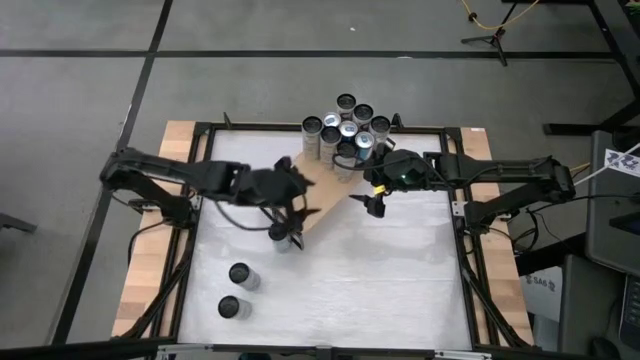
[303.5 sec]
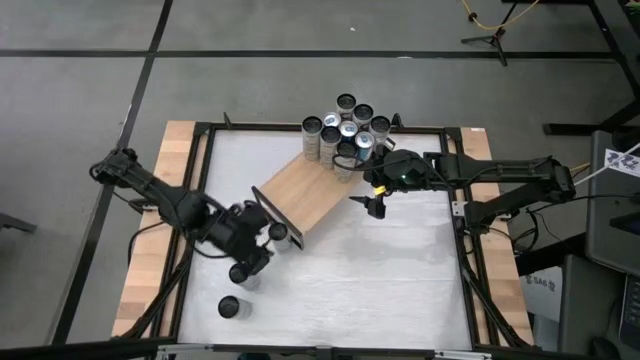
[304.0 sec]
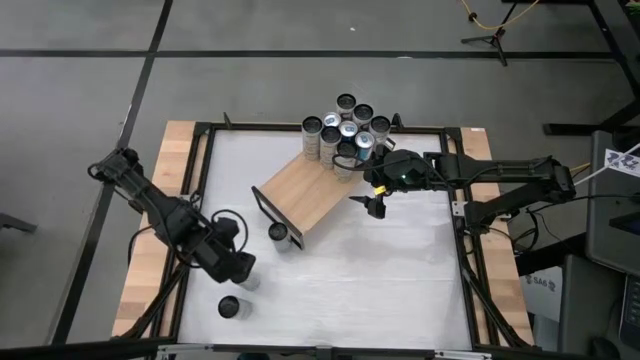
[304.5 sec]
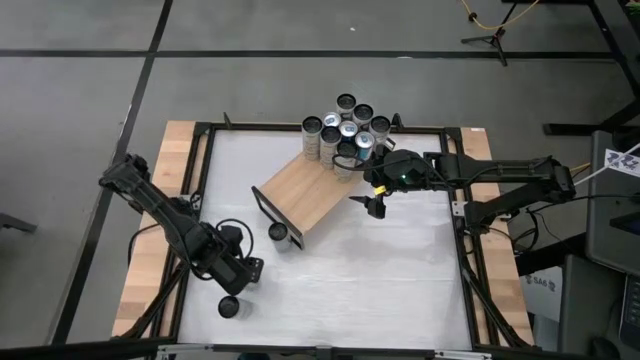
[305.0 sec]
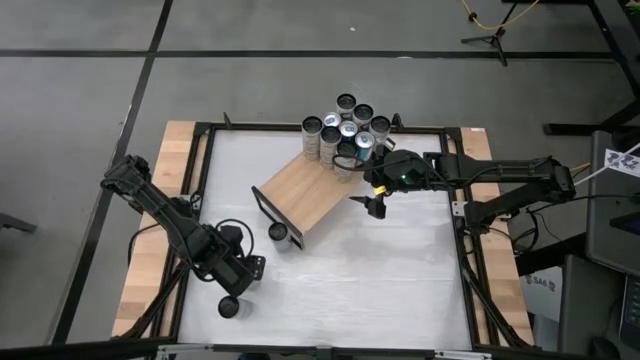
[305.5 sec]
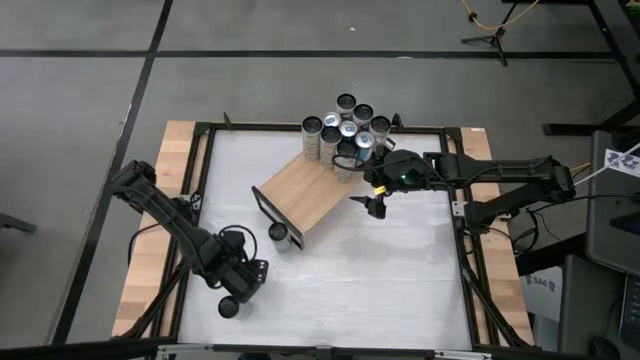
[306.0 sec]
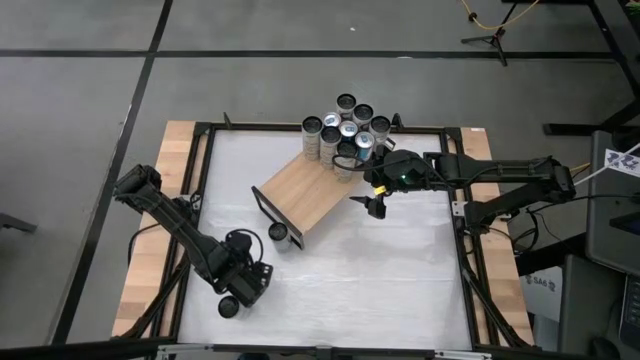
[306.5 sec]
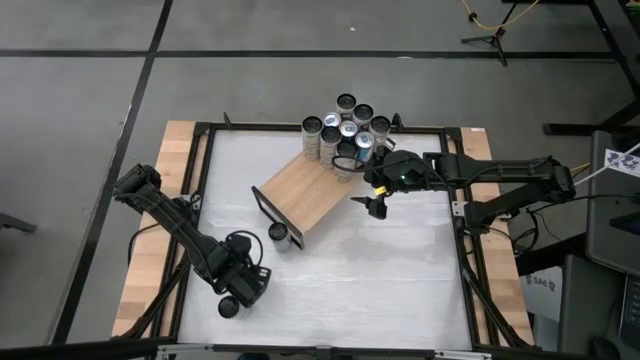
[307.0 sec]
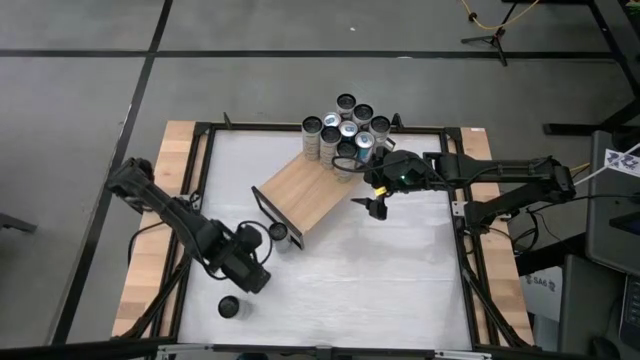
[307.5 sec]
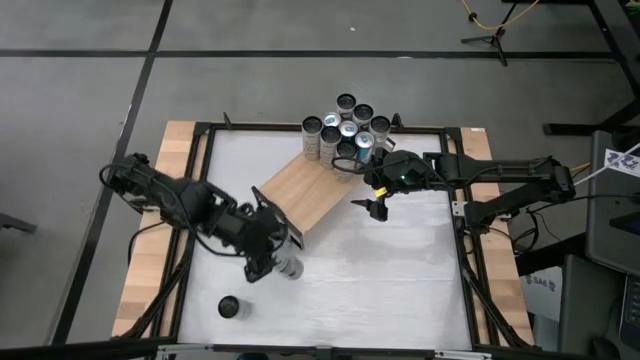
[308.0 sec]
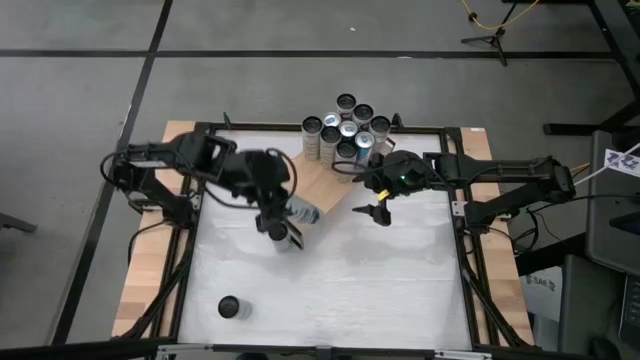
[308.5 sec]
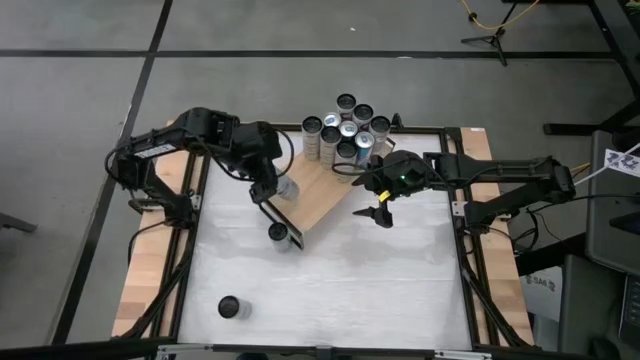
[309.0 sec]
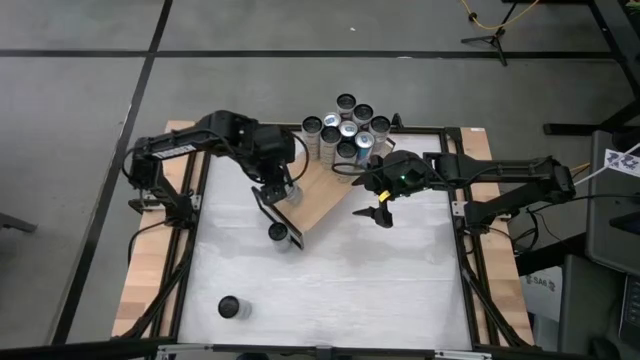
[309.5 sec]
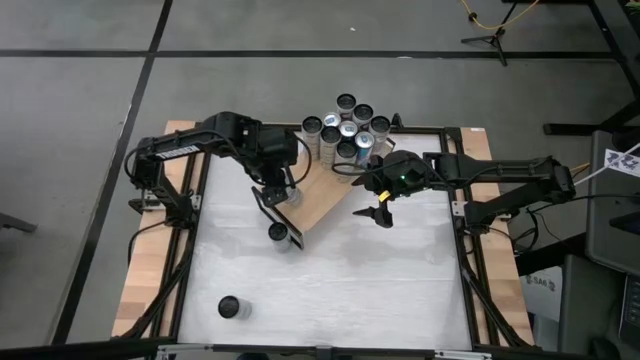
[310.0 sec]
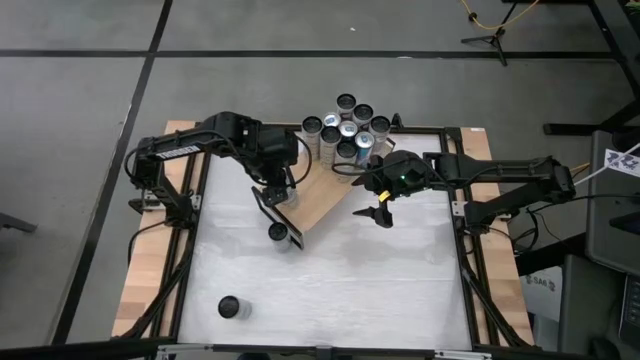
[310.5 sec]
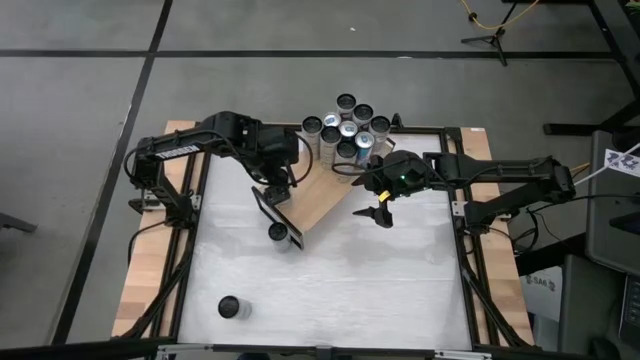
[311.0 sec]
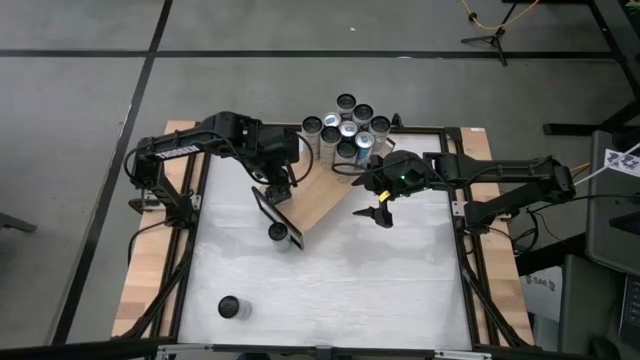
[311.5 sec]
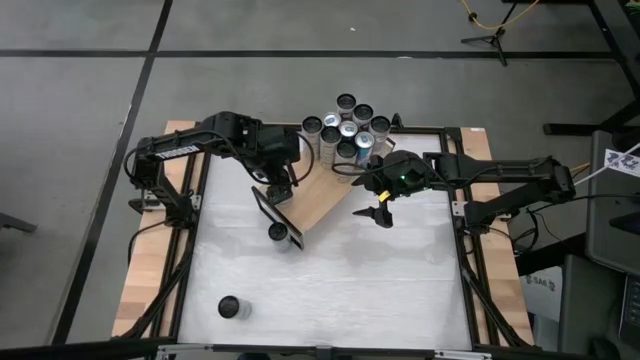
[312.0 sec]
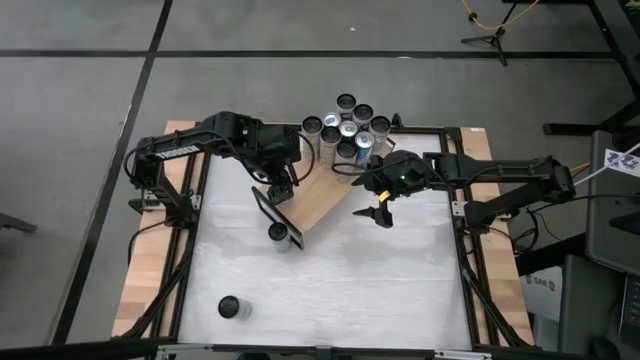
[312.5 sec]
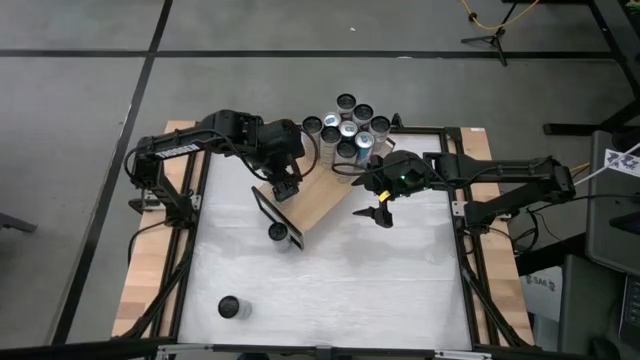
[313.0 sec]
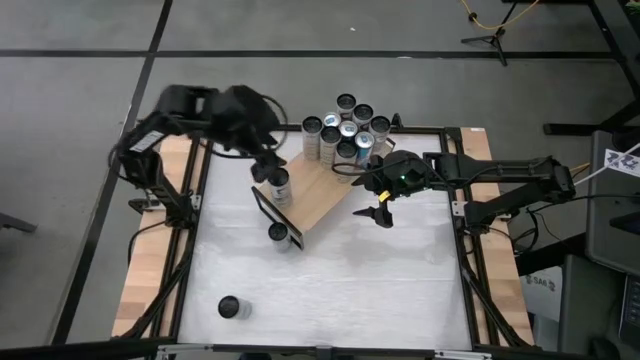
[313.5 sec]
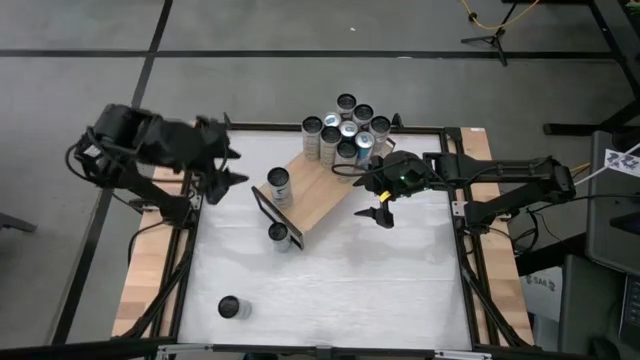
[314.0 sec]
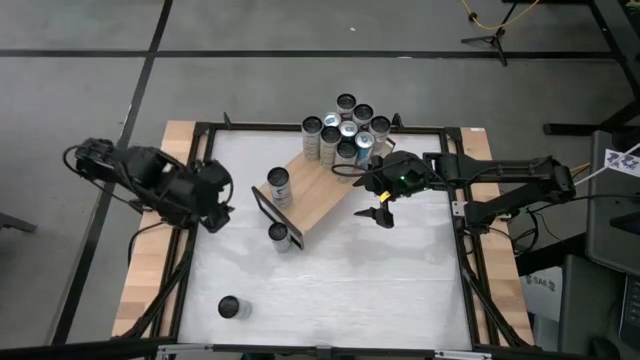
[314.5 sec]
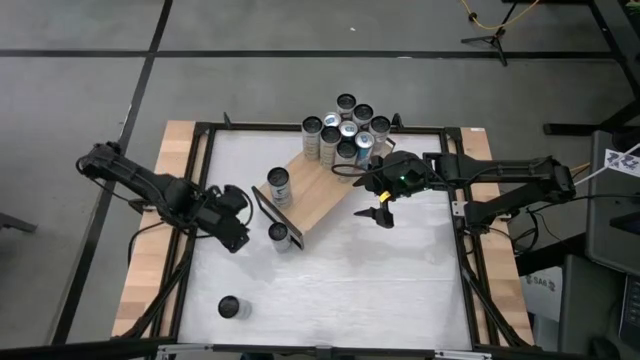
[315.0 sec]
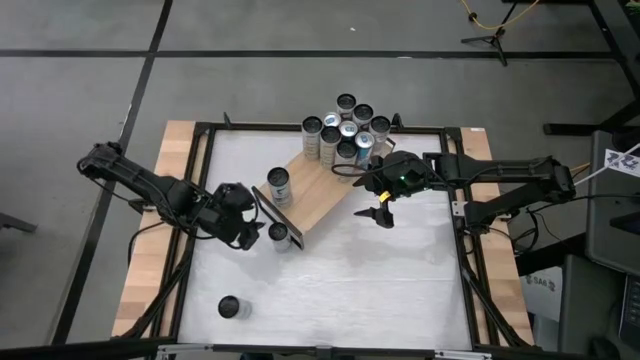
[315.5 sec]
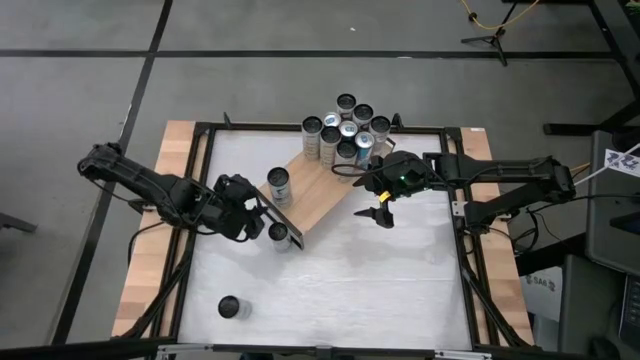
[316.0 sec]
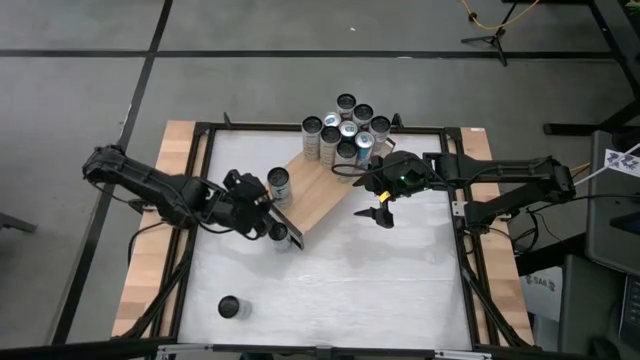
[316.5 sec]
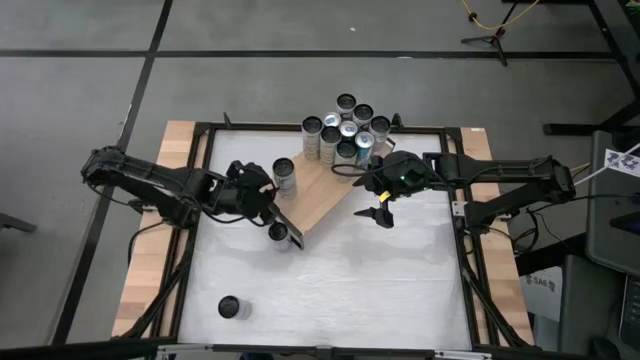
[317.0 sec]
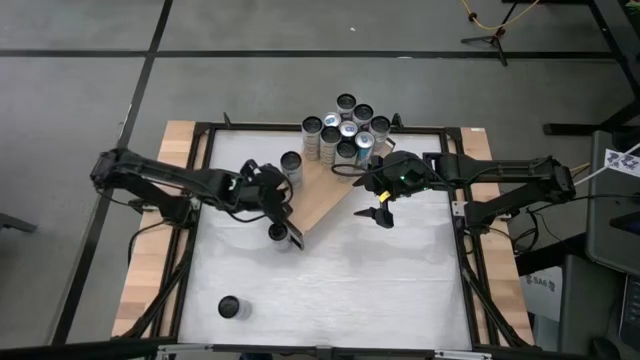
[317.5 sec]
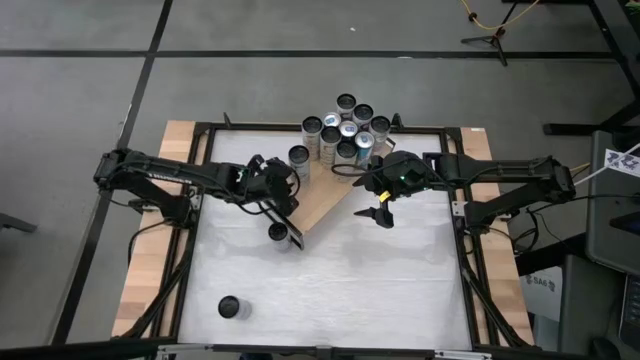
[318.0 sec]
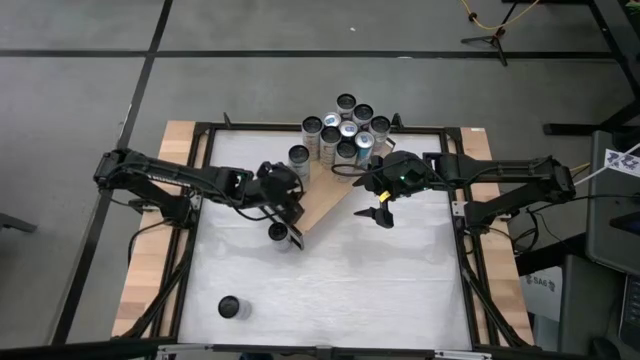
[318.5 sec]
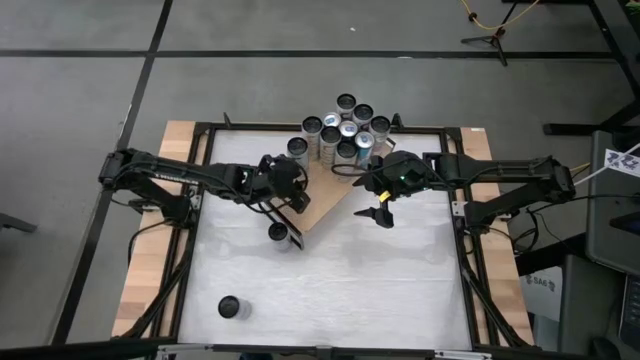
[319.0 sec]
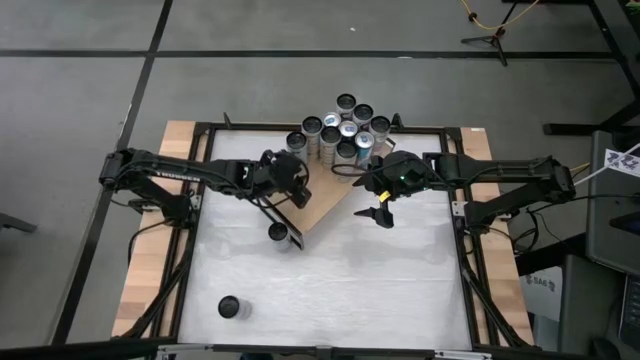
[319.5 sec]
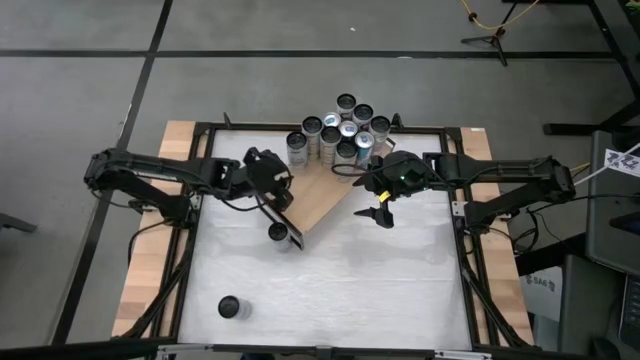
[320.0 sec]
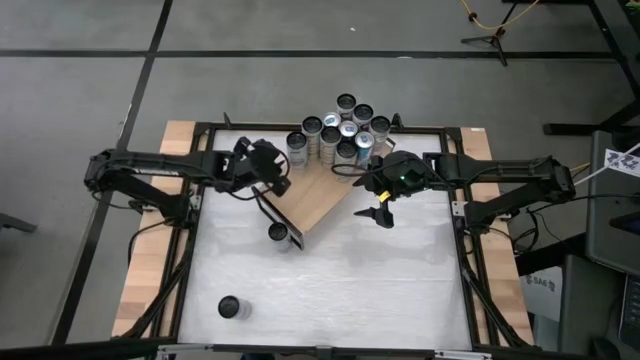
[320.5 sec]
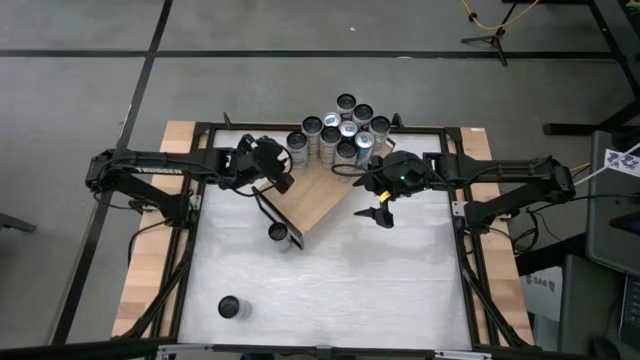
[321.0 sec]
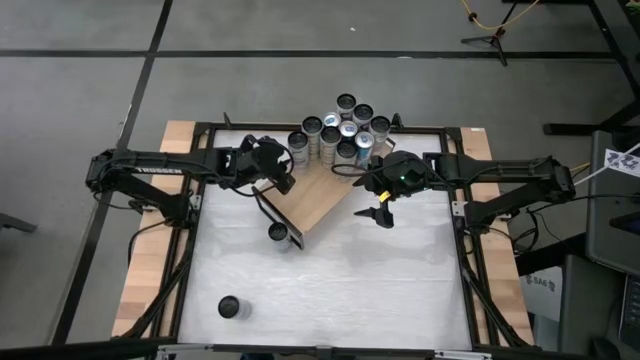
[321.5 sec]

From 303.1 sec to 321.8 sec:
Task: Place canned beverage on shelf
Put the white-blue soda can on the shelf
